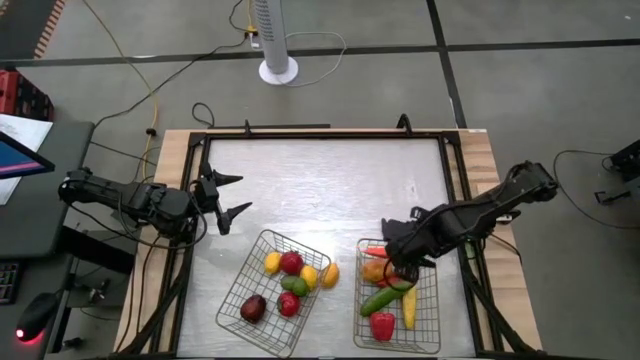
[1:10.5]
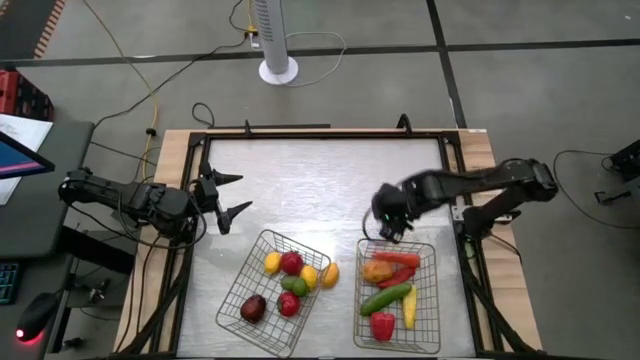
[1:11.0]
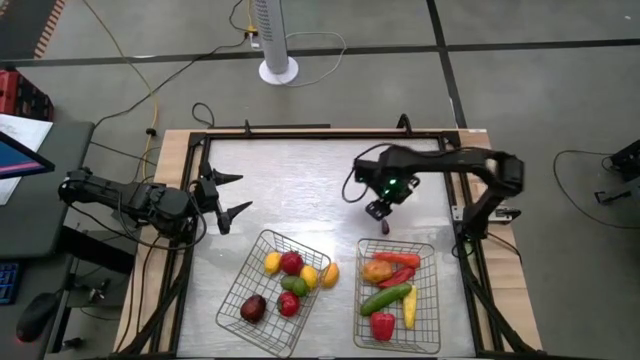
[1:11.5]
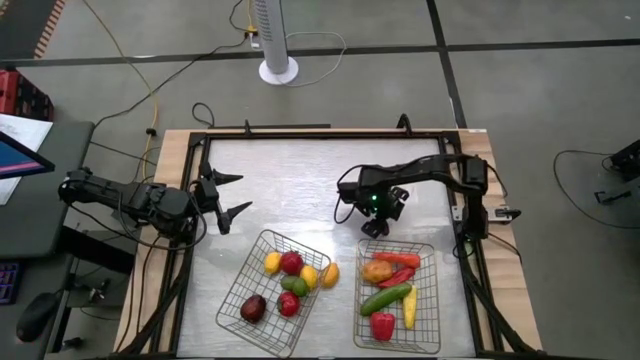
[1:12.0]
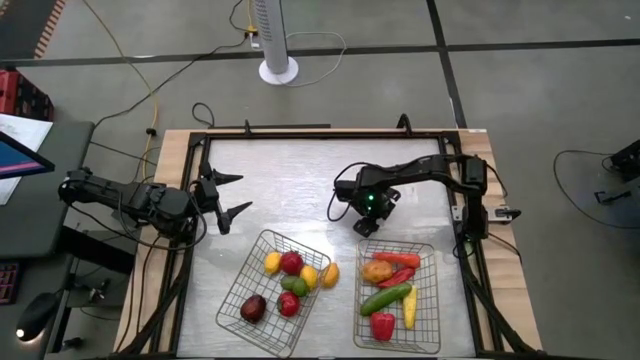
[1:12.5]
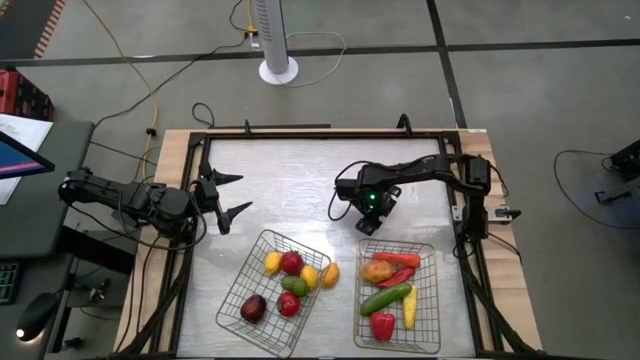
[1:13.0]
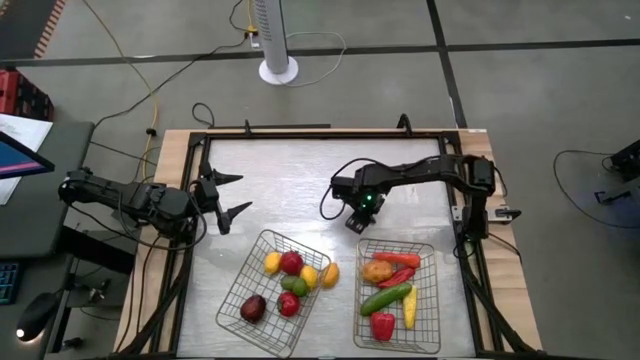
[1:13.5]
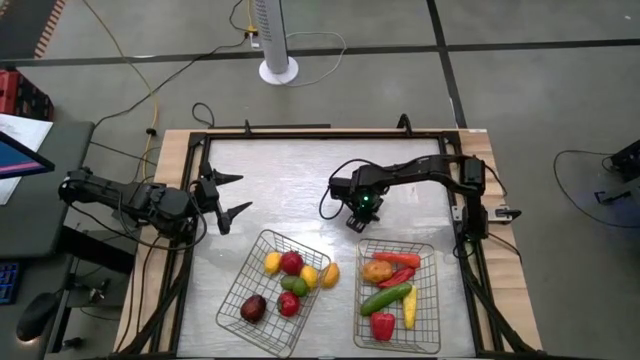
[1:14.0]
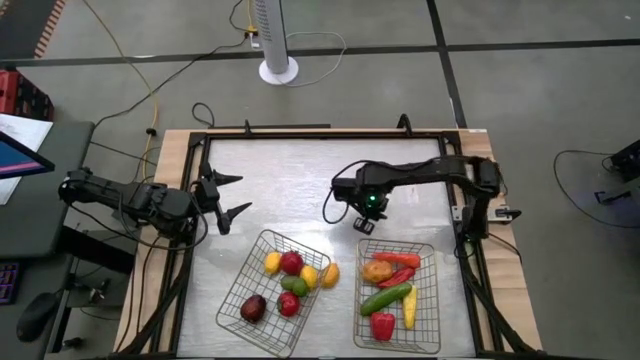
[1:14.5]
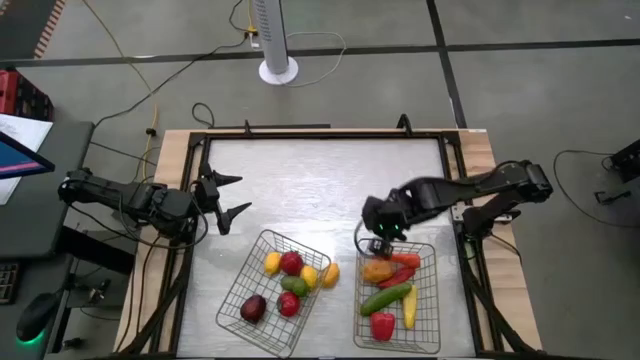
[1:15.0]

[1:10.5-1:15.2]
Task: Sort produce into baskets
Put the purple eggplant into the right wire basket

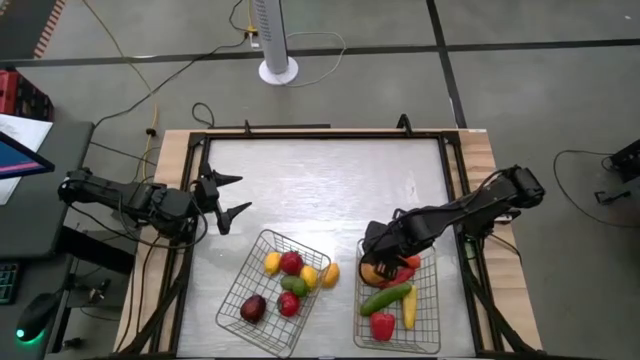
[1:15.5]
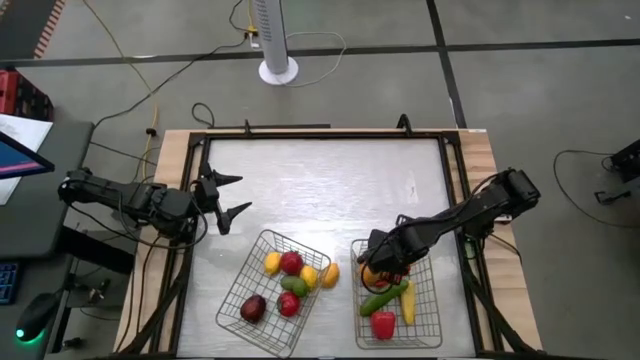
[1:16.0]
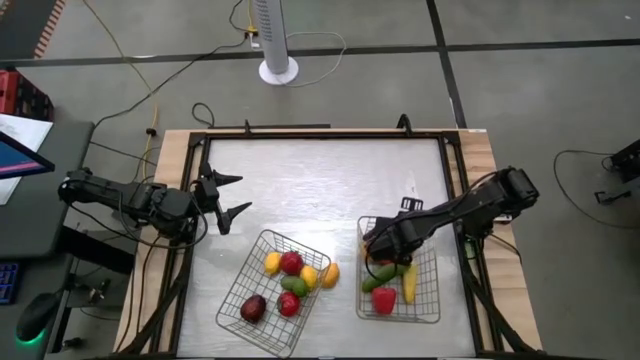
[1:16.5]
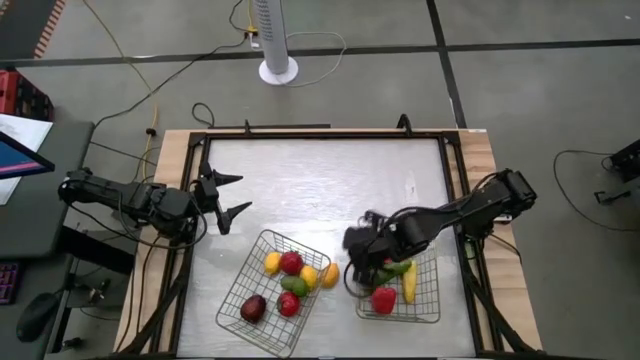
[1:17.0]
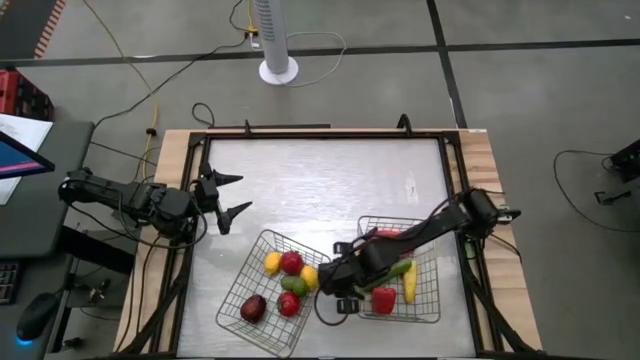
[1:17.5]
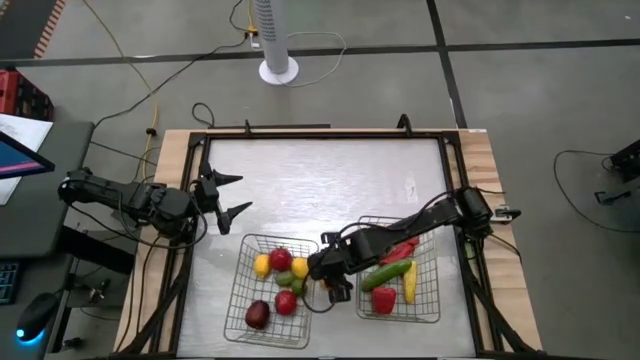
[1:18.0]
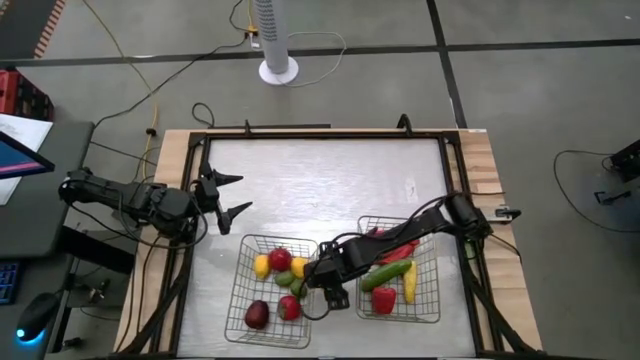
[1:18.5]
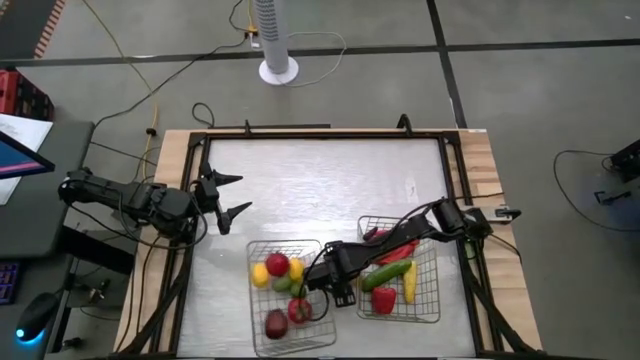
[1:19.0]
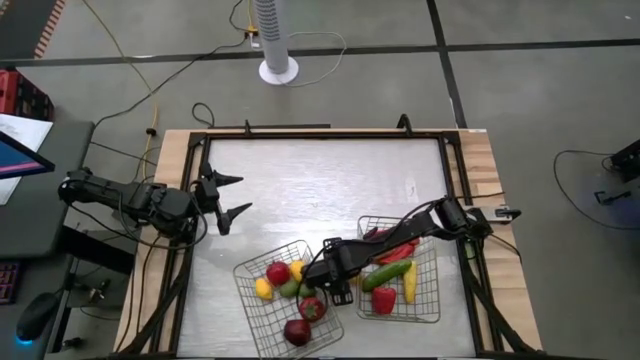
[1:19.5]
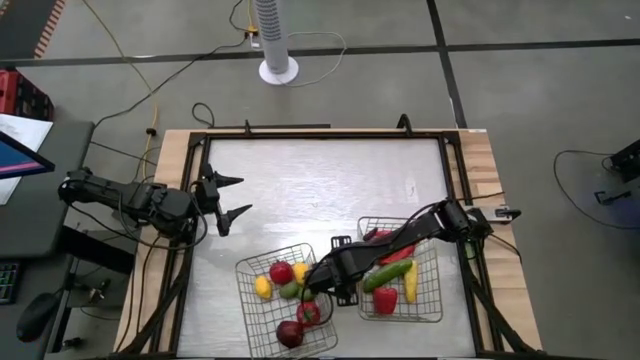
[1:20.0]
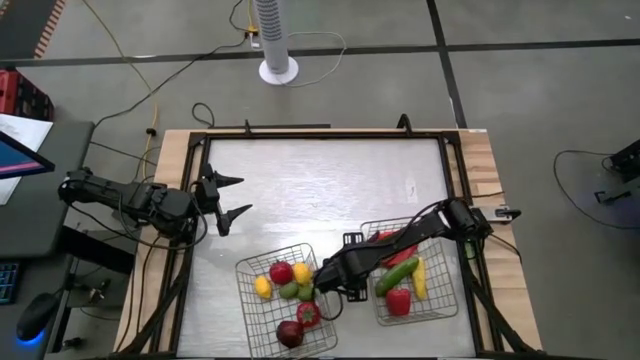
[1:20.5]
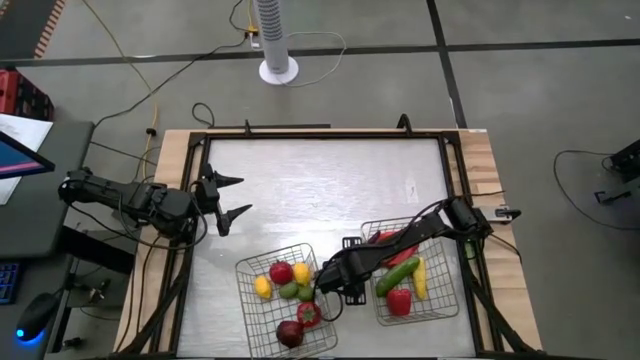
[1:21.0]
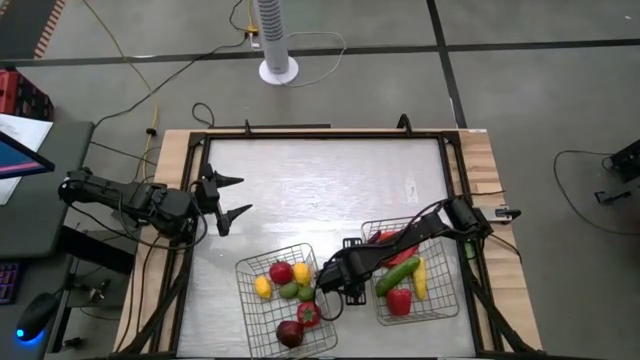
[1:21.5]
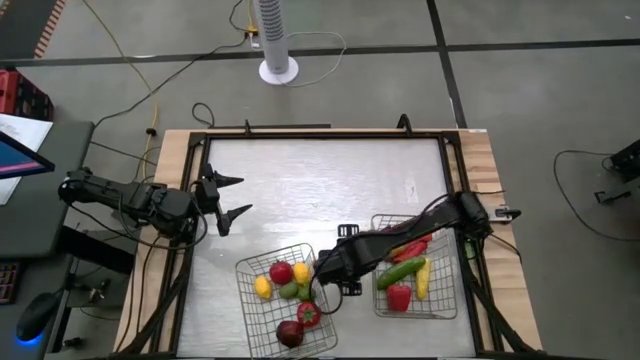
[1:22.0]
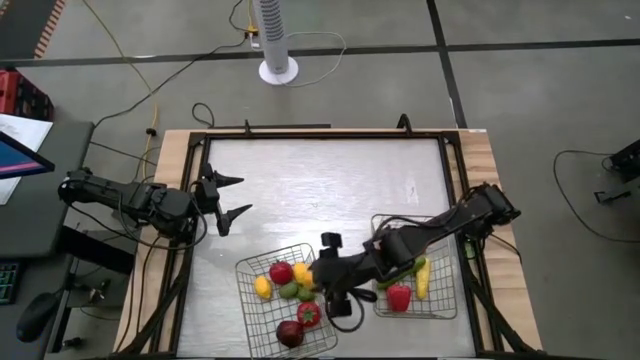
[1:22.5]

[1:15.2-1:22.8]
Put the yellow lemon into the left wire basket

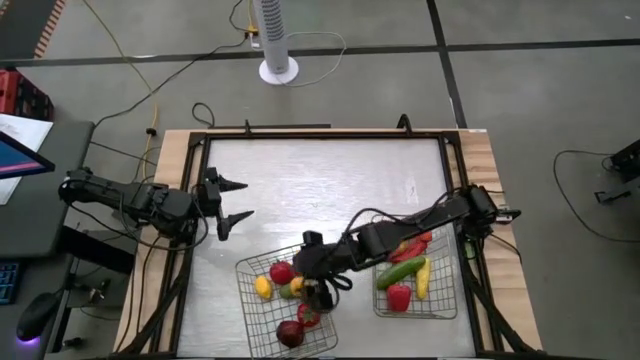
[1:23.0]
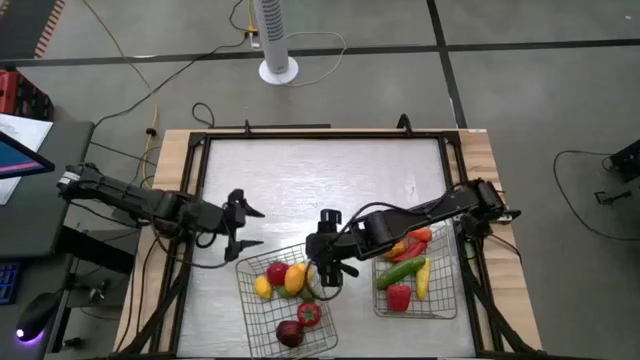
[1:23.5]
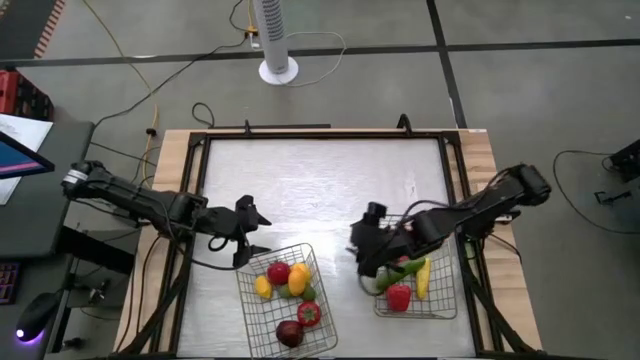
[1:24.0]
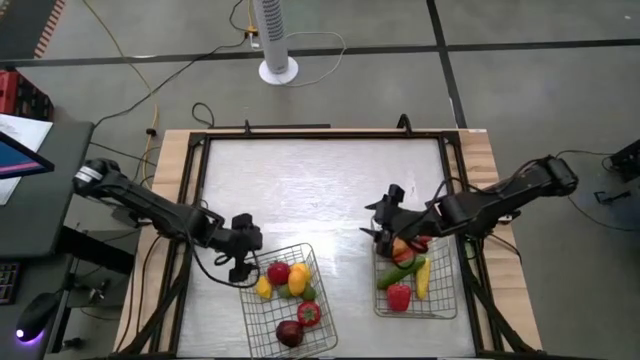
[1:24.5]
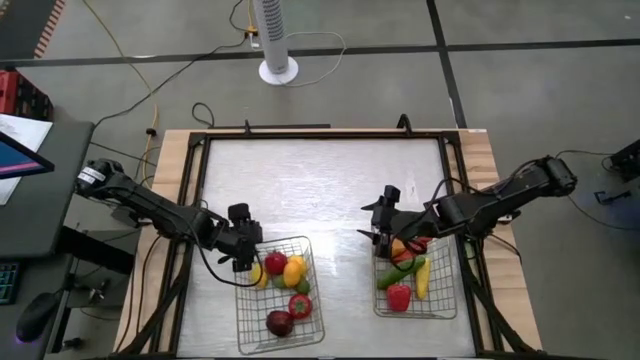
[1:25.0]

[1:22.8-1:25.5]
Adjust the left wire basket

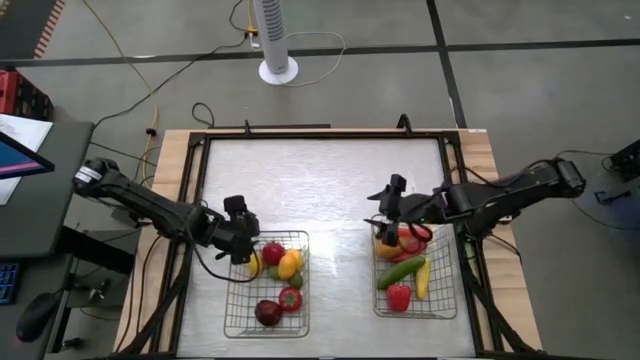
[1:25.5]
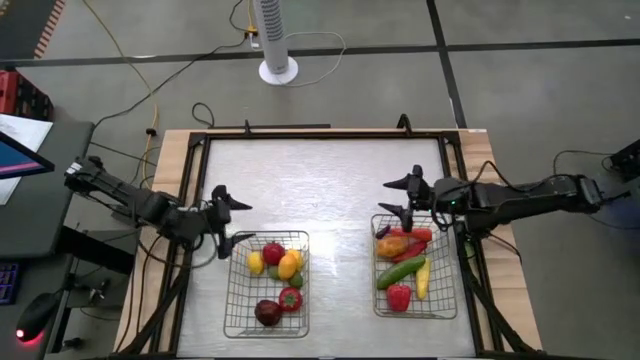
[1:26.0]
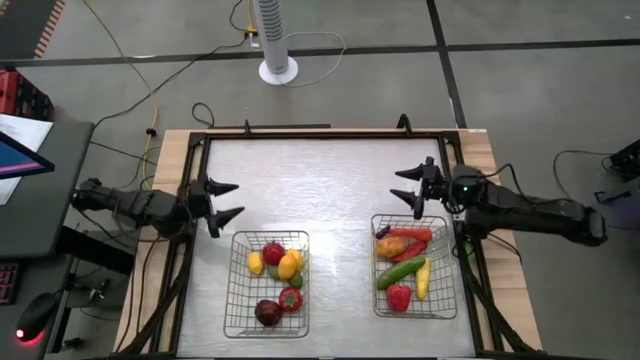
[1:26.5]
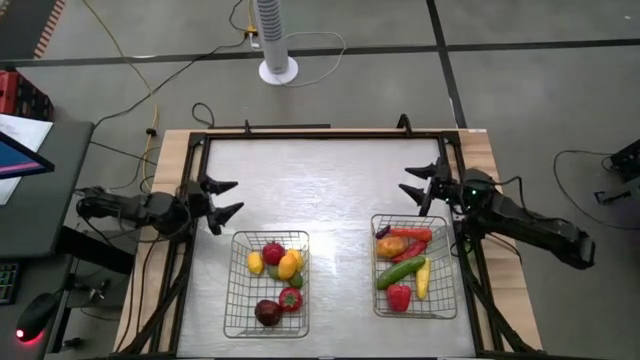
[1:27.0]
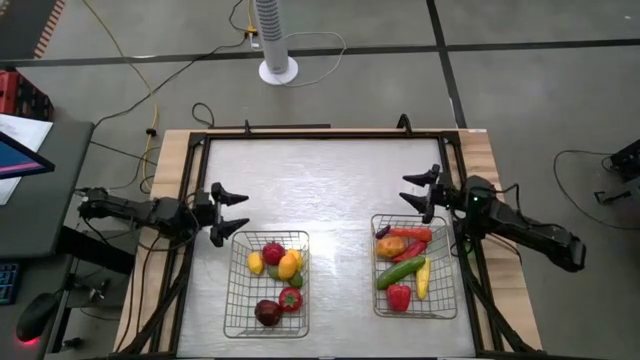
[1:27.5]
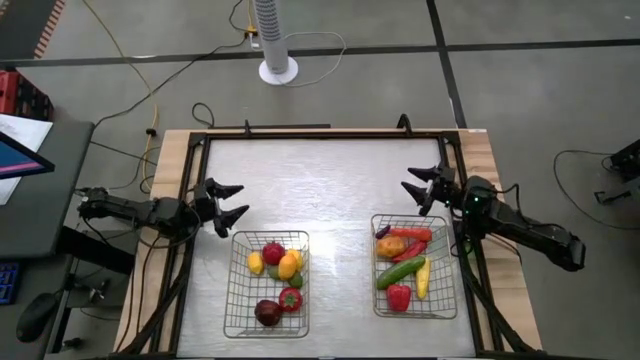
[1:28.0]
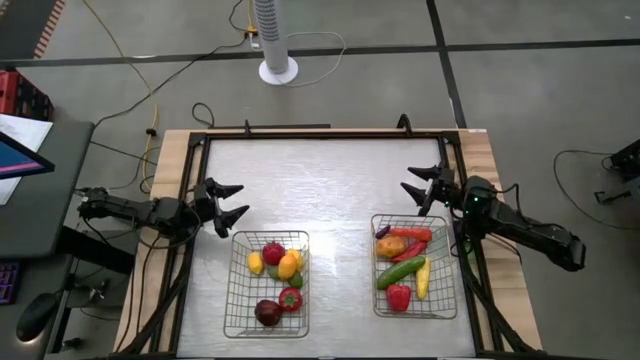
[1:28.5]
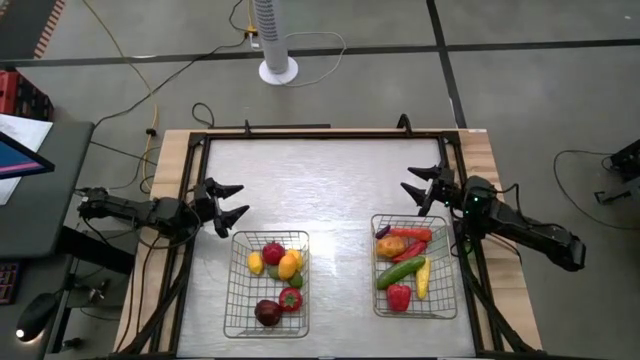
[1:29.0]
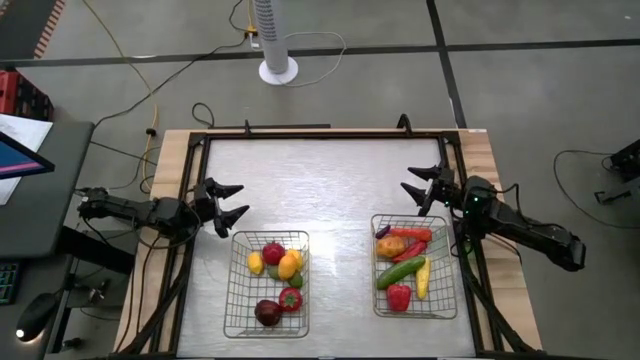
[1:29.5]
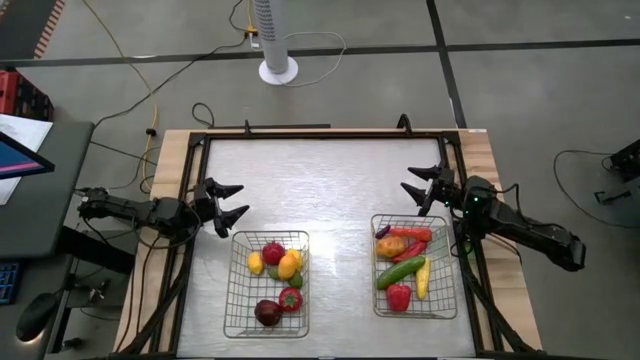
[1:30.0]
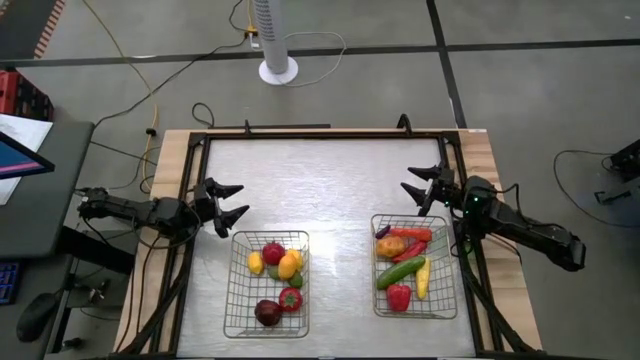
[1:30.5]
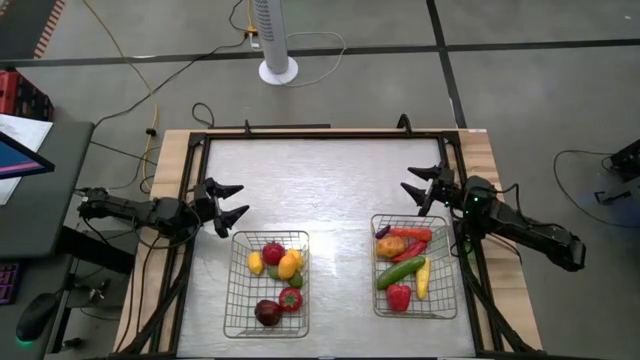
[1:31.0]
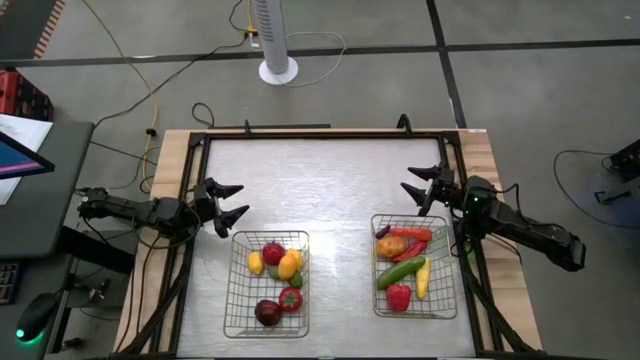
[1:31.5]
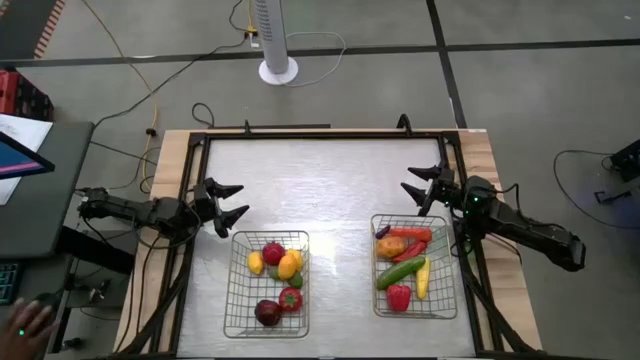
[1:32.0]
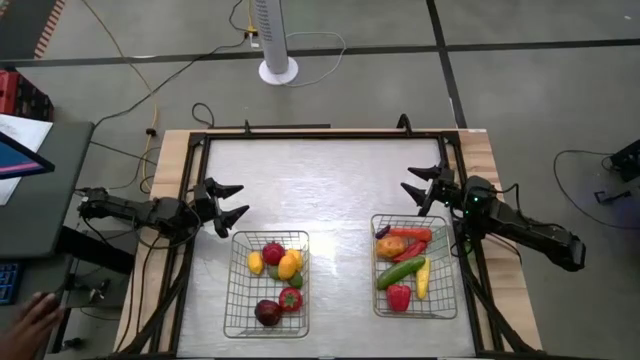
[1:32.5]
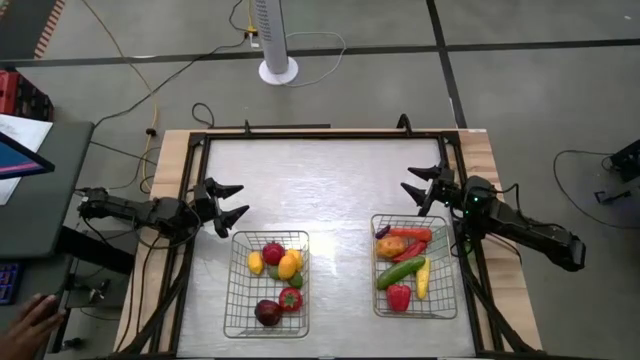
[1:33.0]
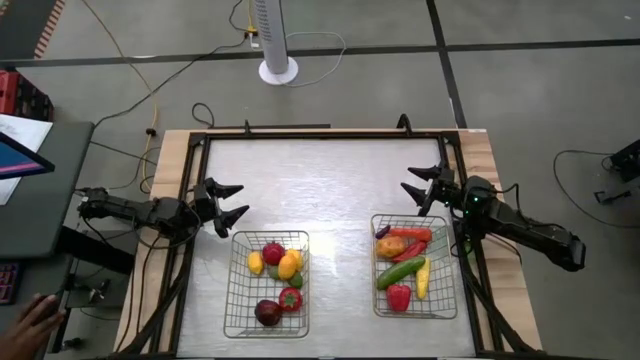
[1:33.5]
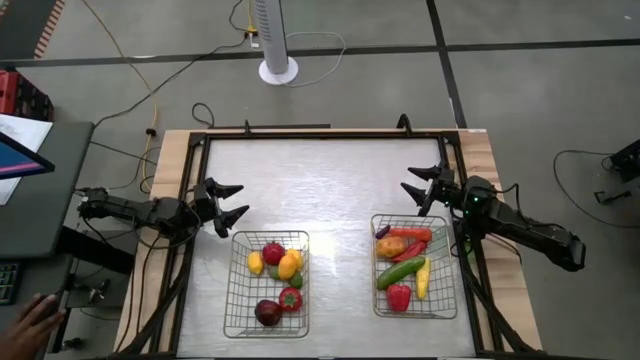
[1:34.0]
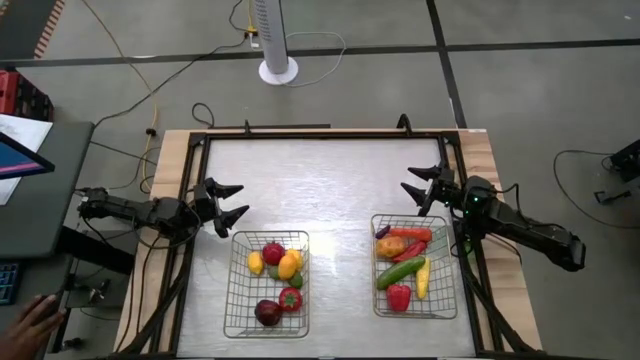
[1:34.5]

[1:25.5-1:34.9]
Return to Home Position
